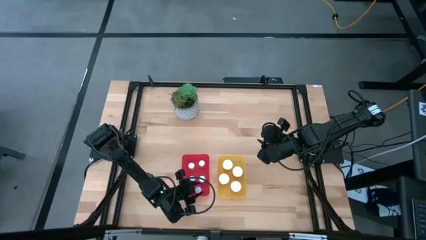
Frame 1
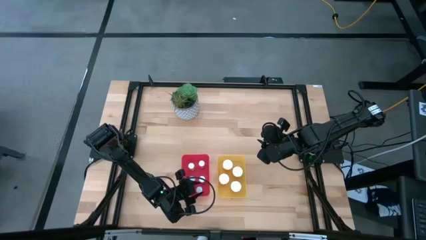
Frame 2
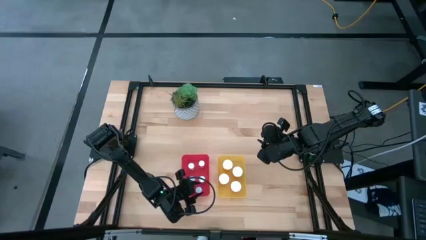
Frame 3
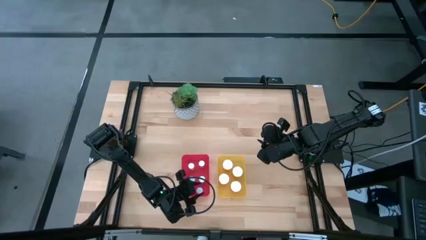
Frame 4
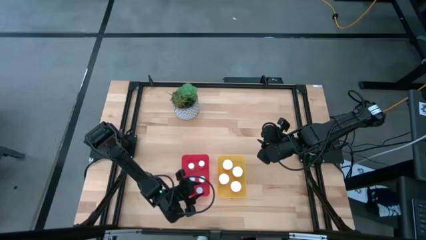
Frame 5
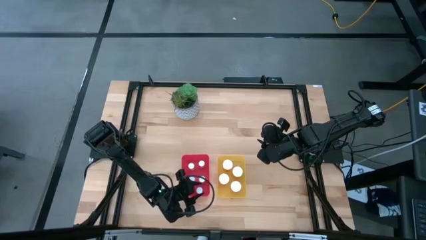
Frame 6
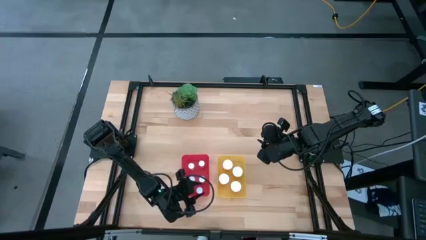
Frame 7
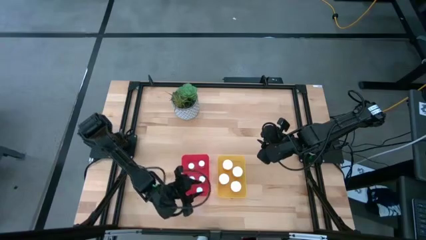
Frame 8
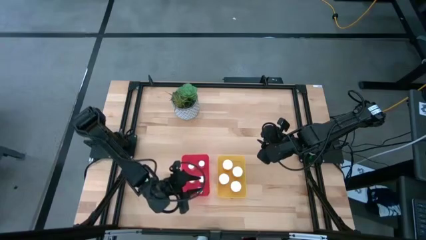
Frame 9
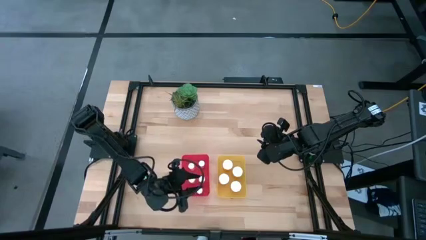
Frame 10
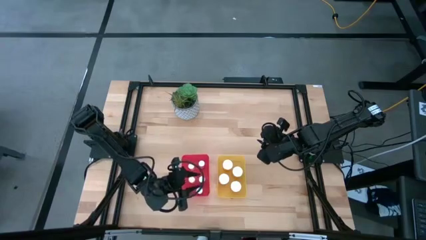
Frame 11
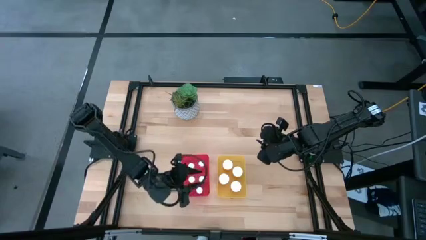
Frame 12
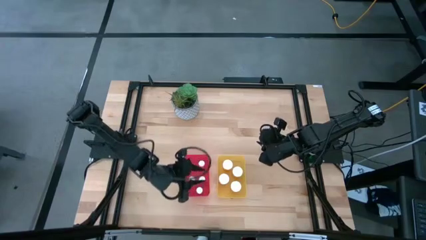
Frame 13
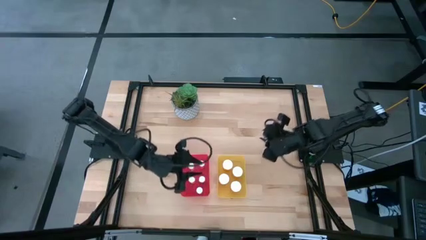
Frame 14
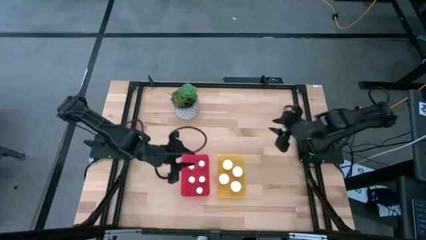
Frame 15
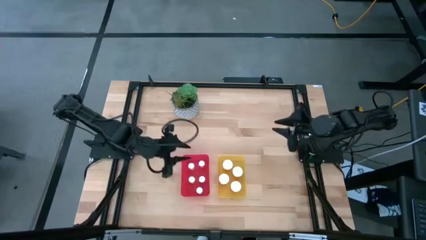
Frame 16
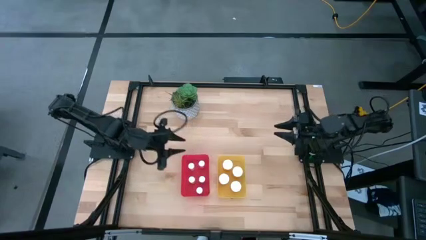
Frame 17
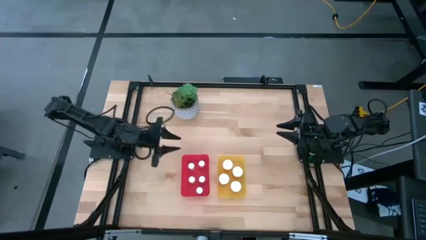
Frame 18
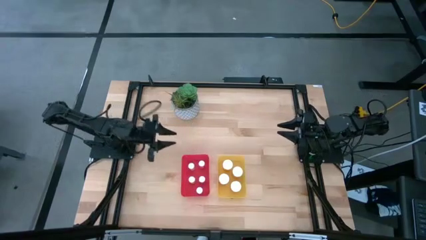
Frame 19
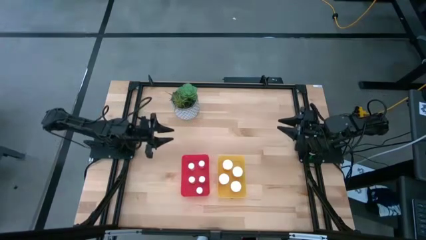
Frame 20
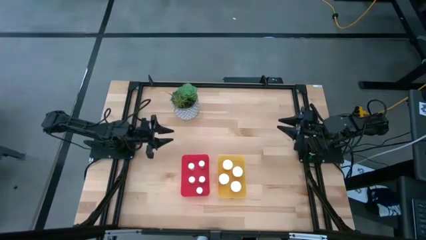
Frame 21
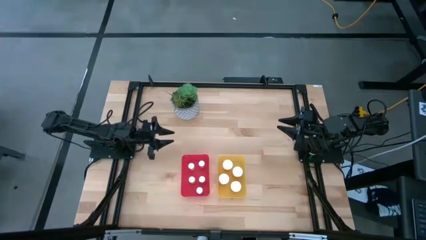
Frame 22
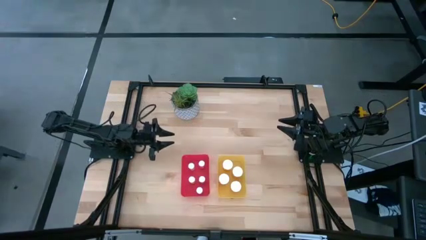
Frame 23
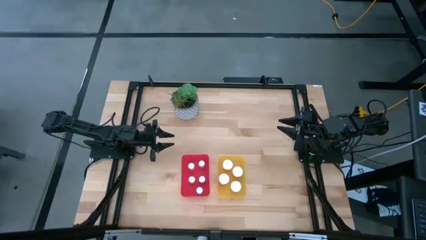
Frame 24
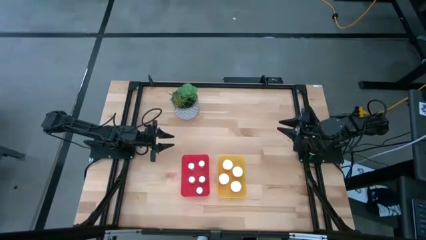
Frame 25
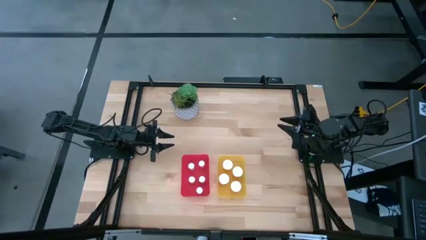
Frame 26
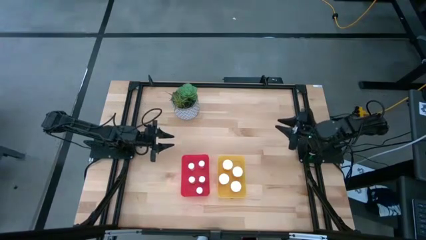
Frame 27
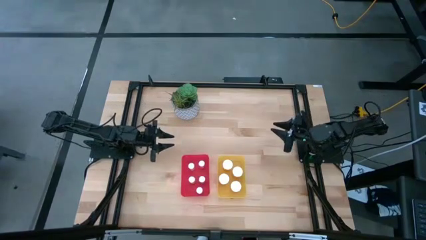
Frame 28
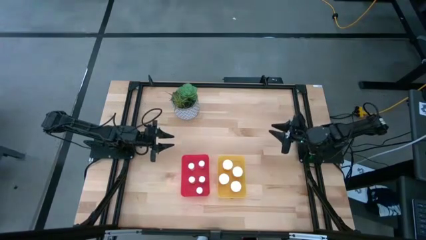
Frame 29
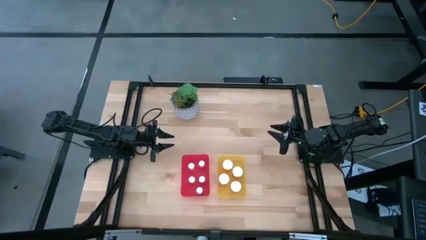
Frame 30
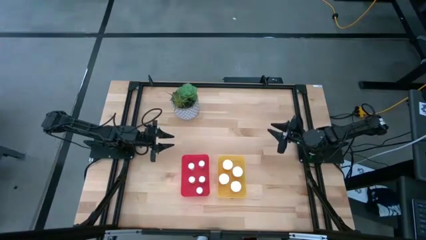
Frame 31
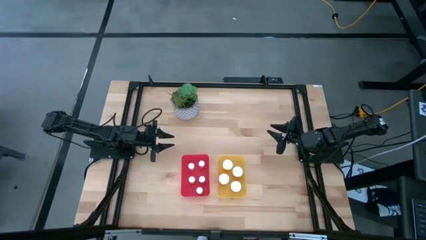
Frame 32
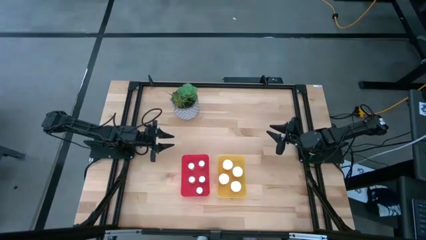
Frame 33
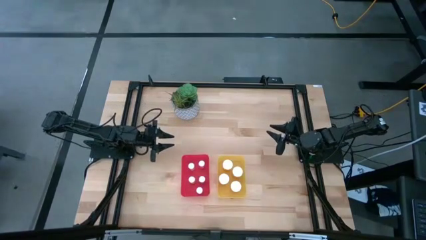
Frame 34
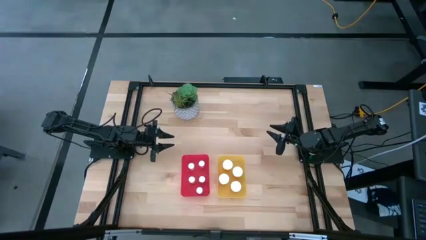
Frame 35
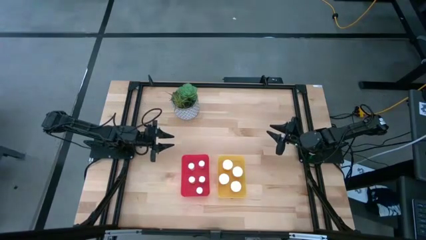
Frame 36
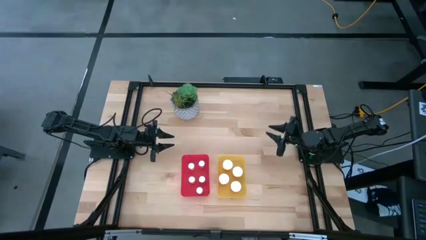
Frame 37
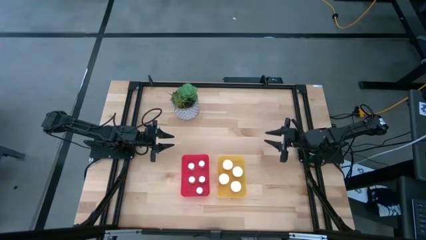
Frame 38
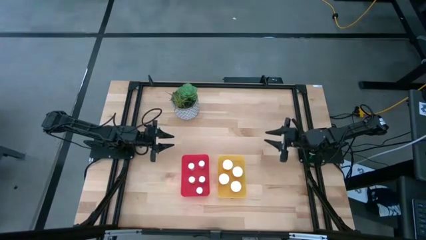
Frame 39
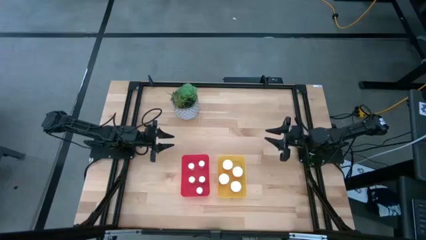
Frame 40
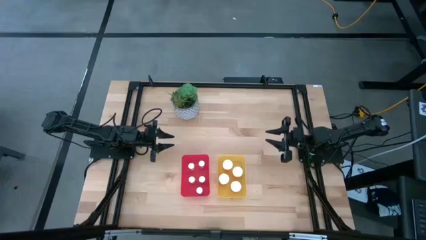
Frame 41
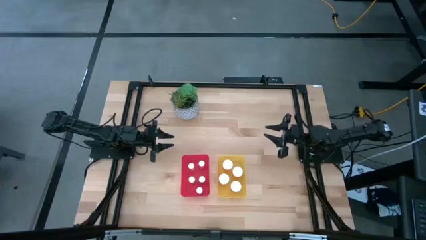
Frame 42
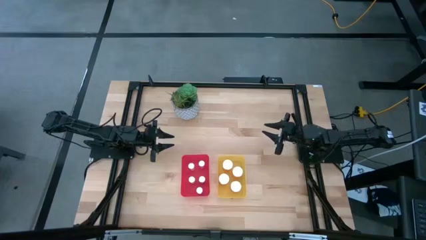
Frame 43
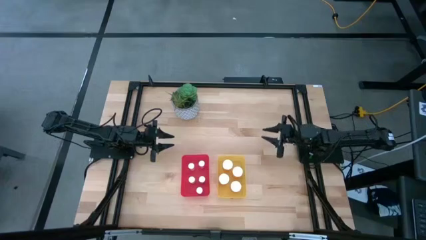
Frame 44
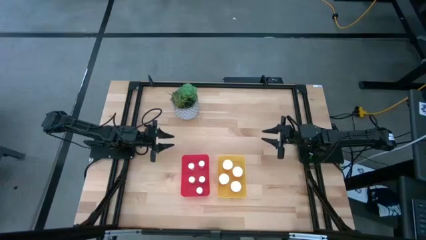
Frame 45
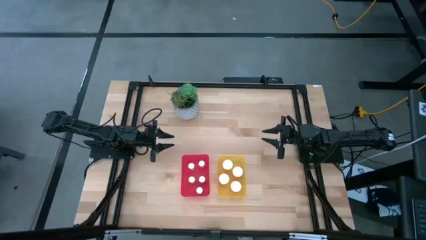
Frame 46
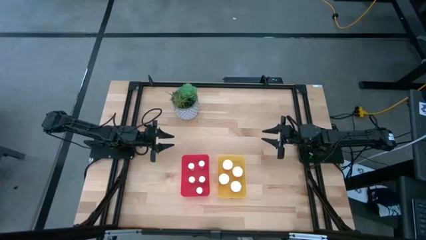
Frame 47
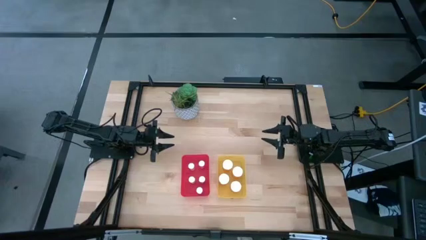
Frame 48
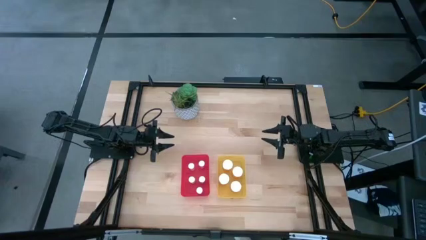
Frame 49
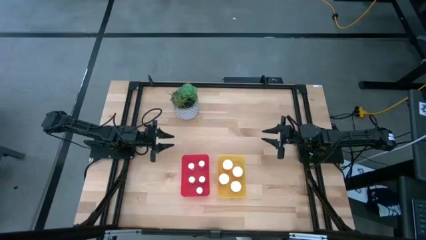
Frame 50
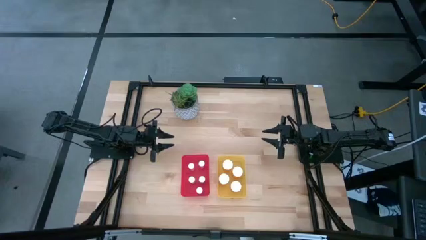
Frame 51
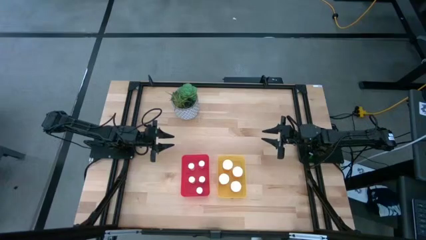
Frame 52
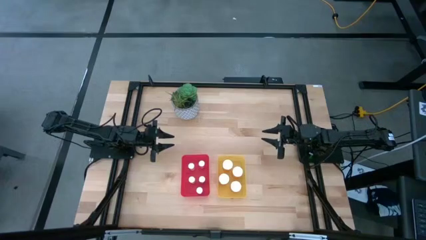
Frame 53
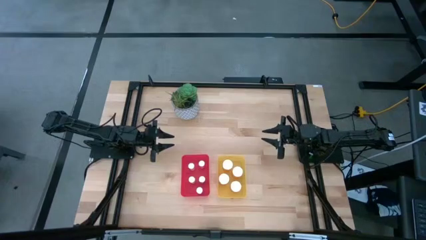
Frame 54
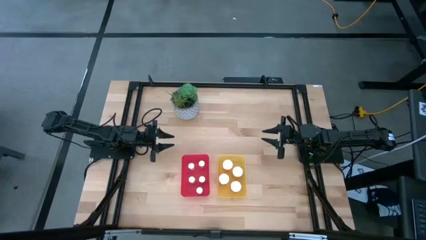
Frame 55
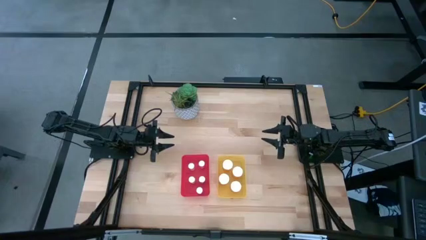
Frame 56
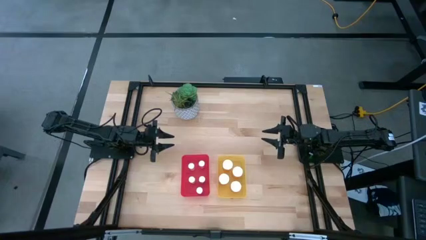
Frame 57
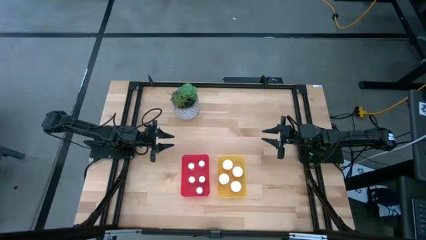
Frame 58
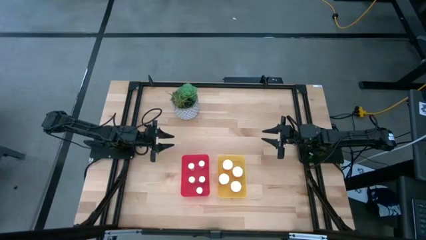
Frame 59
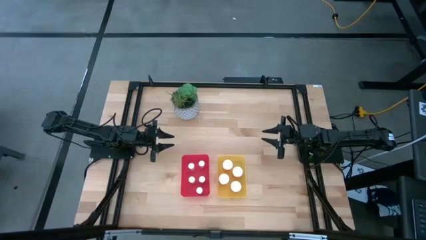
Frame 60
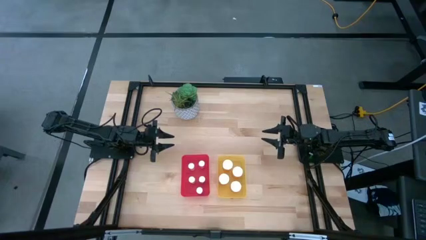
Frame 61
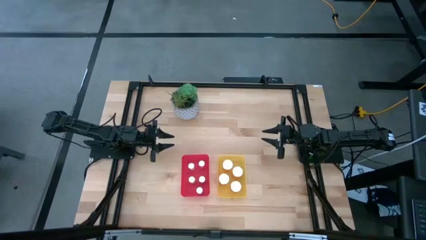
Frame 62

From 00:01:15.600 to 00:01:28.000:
Task: Pick and place medicine bottles into bin by pill shape (circle, oval)
Return to Home Position

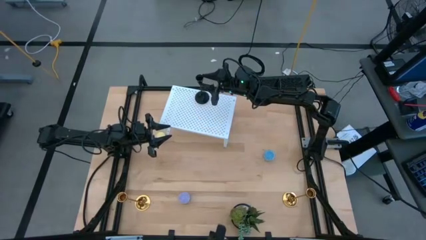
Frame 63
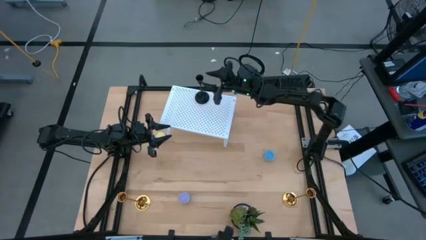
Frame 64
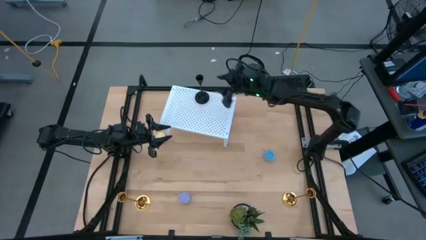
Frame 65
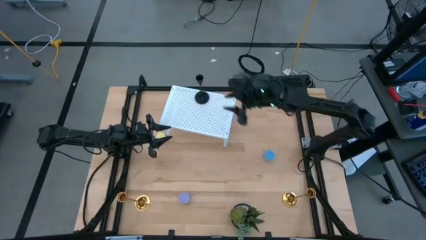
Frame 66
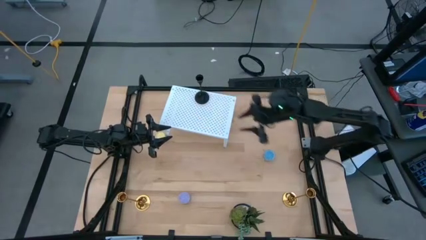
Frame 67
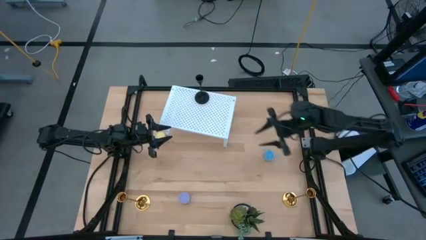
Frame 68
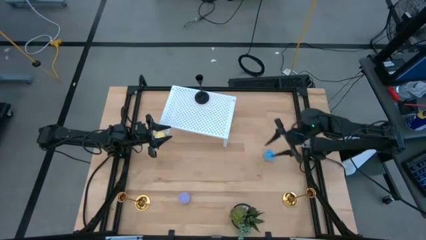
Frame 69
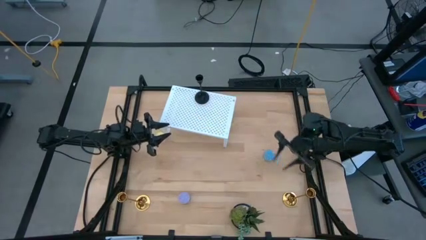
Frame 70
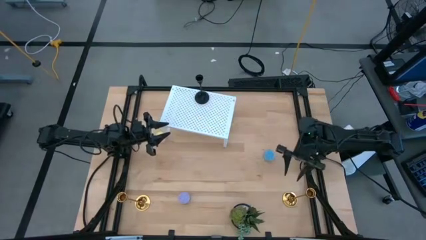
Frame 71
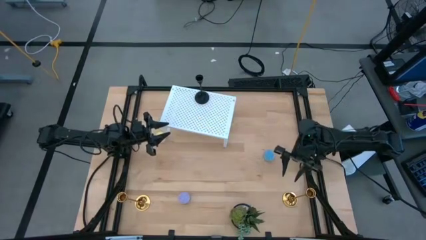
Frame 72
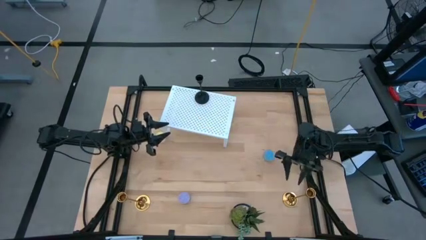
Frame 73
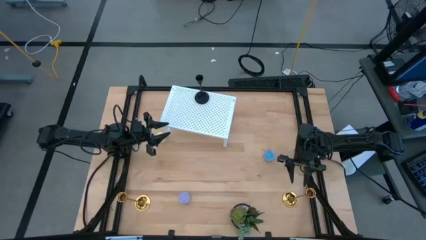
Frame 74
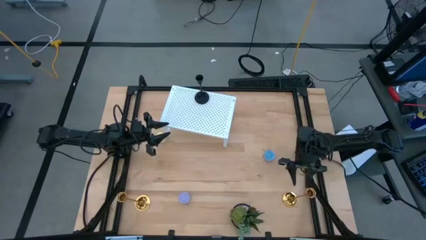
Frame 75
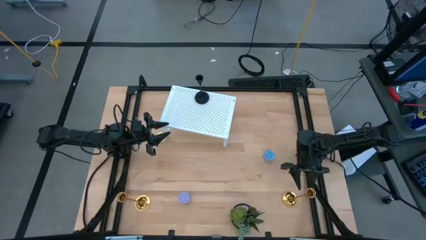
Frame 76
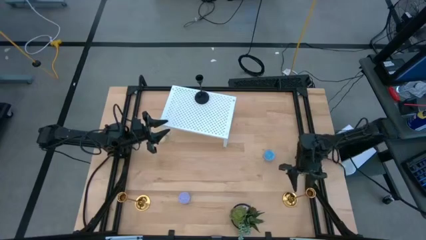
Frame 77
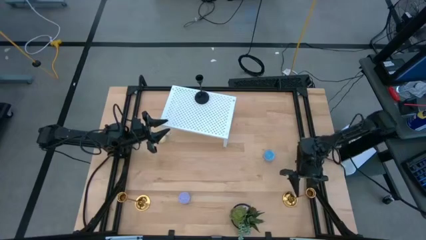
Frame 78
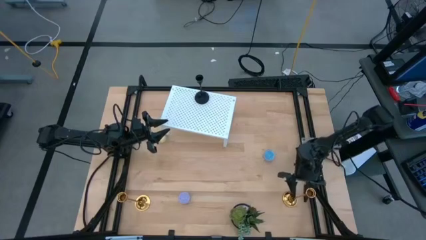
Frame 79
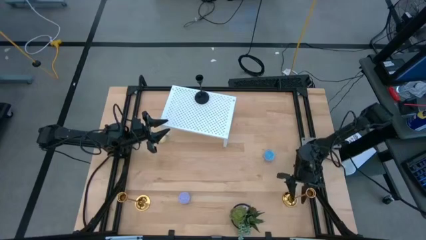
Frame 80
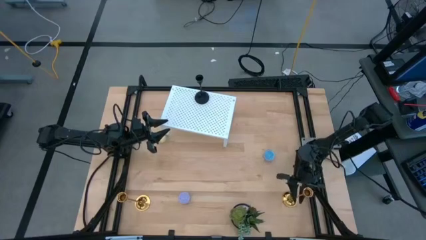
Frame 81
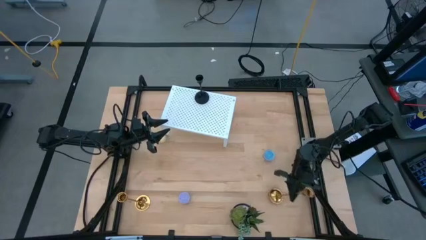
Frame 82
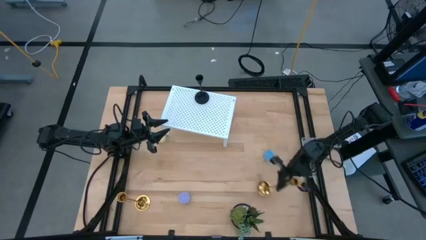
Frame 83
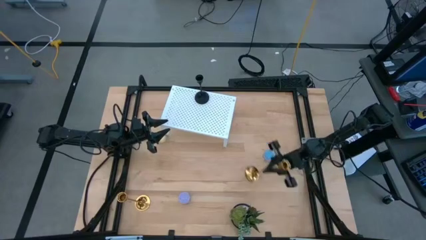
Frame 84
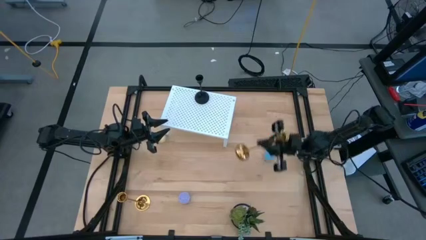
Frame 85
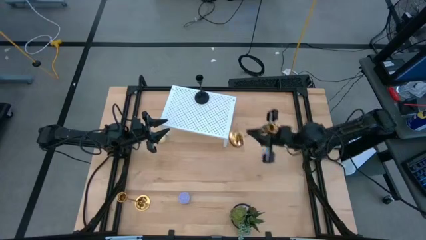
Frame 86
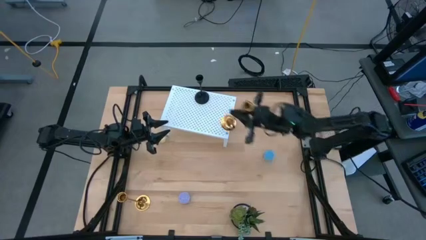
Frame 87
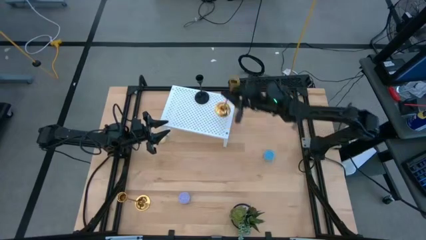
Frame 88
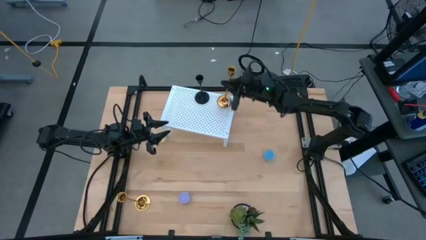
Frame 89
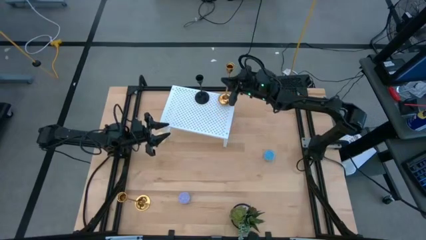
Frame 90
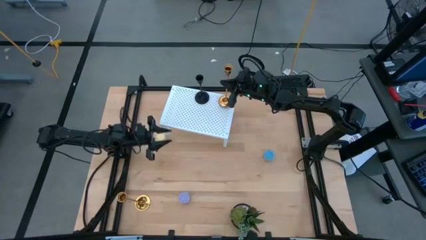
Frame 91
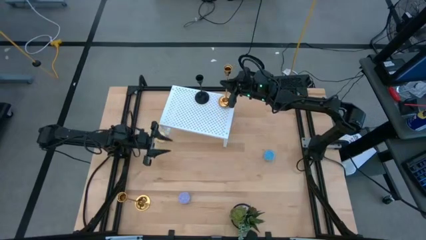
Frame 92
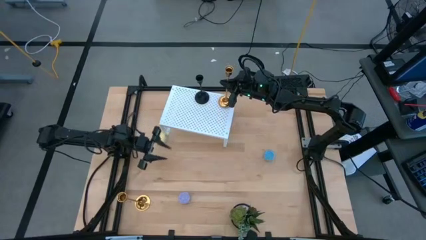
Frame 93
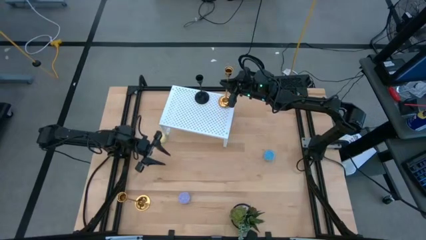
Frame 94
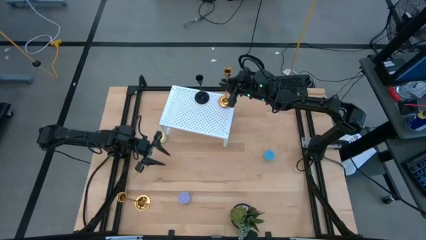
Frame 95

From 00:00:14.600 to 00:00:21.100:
Task: Pick & Place candle stick holders
Put the right gold candle holder on the shelf
